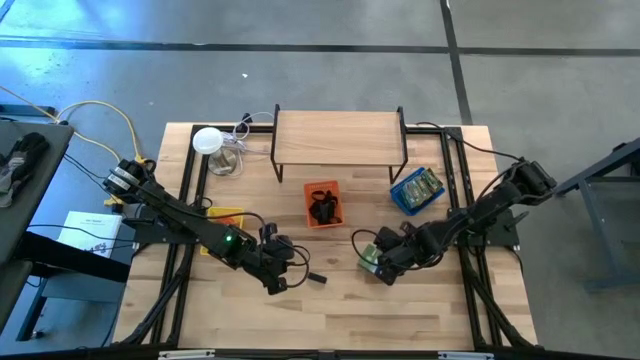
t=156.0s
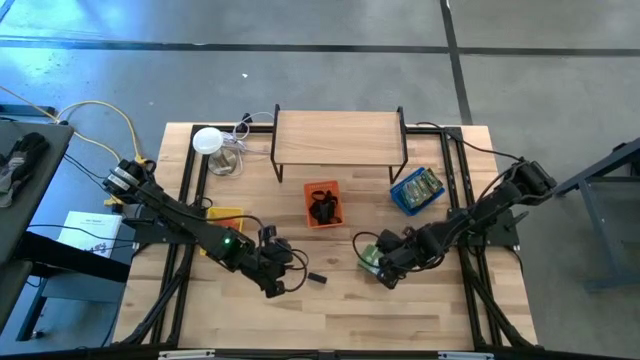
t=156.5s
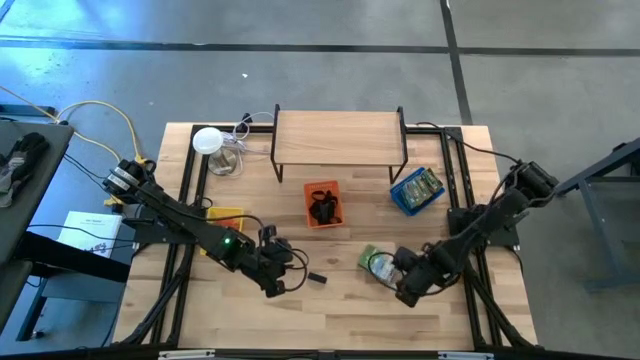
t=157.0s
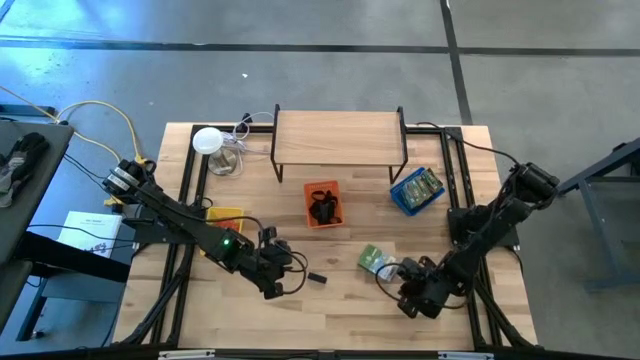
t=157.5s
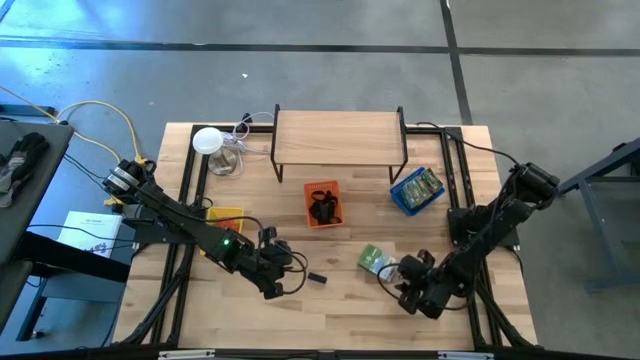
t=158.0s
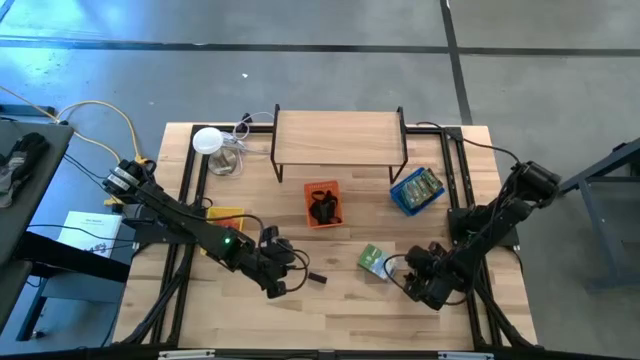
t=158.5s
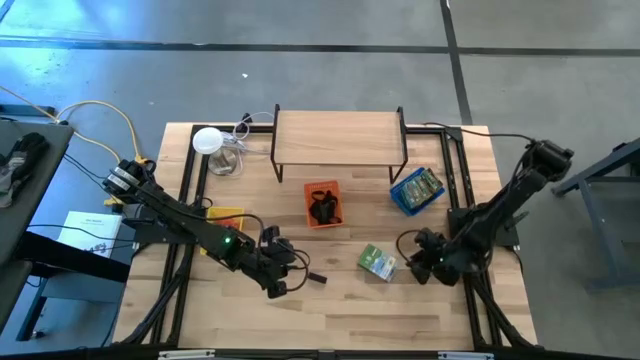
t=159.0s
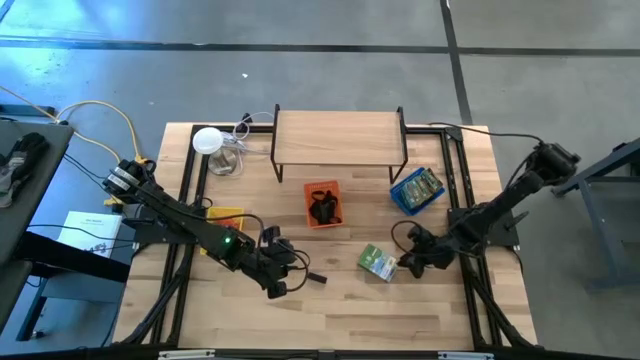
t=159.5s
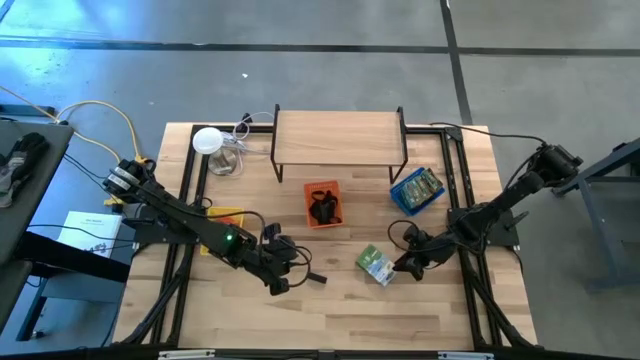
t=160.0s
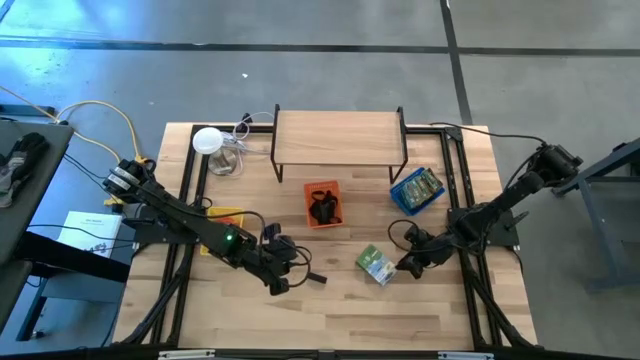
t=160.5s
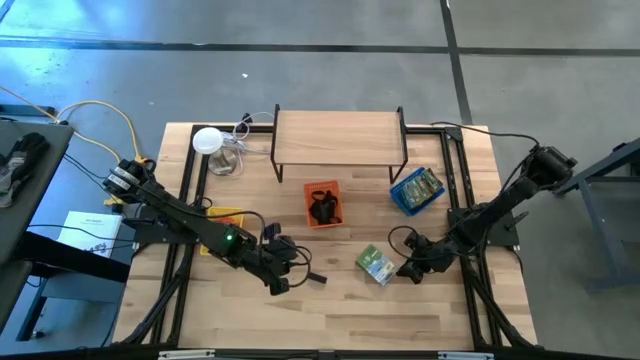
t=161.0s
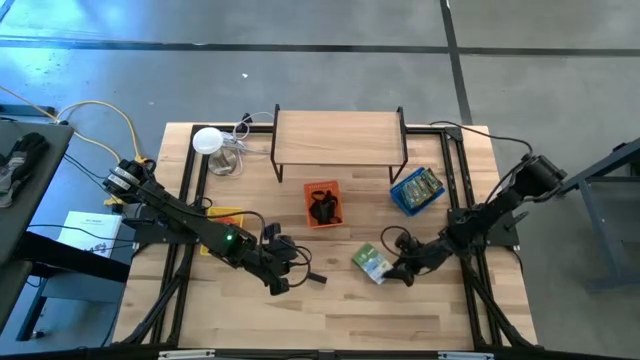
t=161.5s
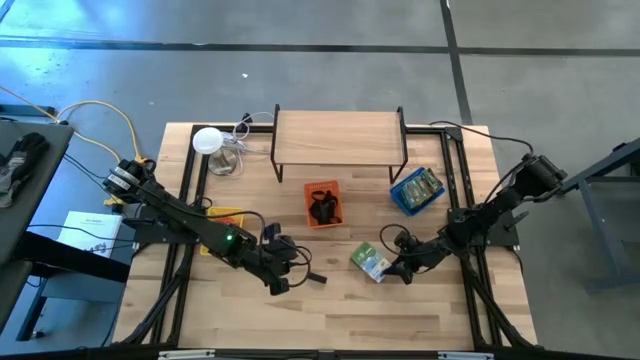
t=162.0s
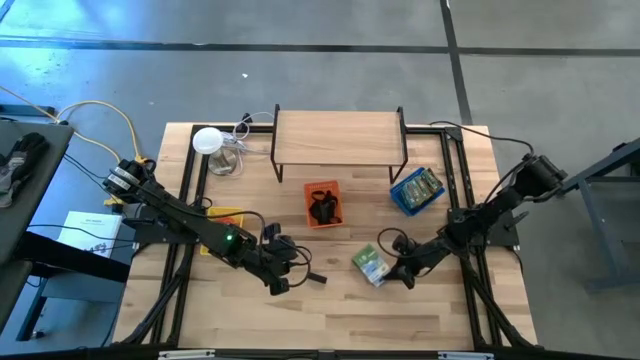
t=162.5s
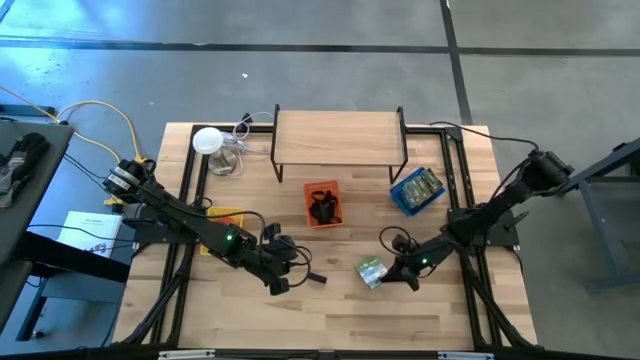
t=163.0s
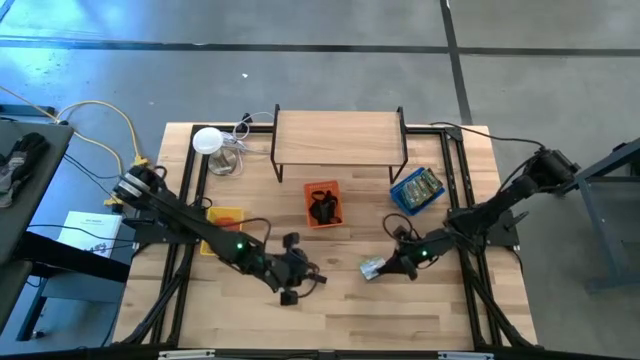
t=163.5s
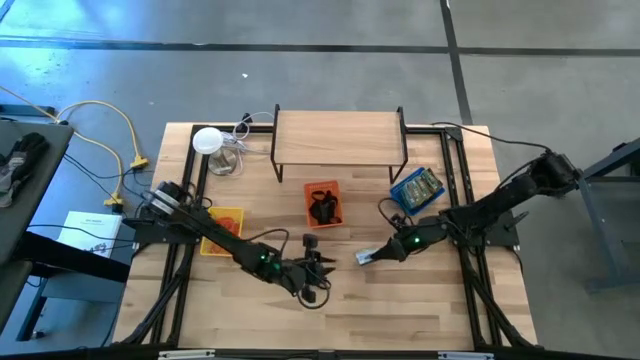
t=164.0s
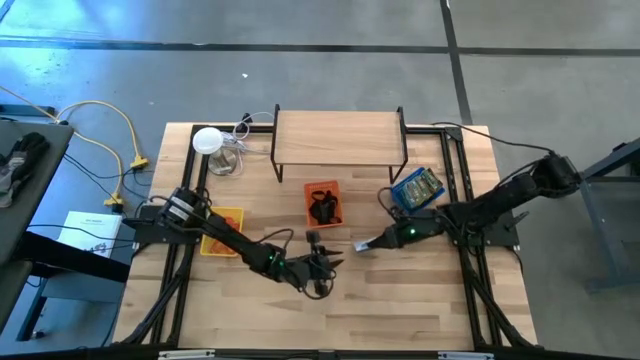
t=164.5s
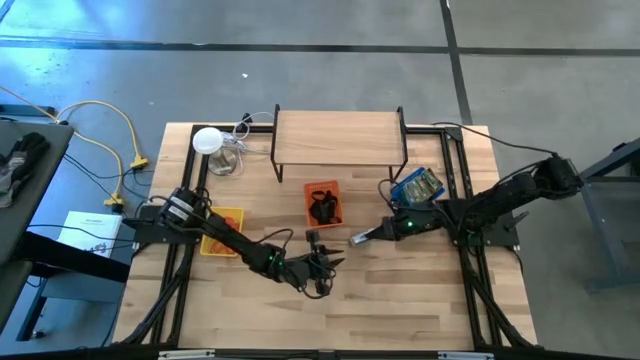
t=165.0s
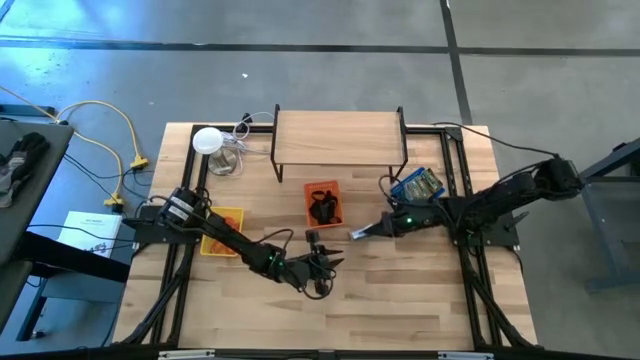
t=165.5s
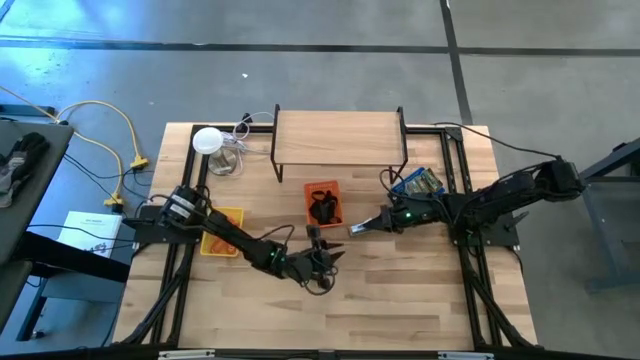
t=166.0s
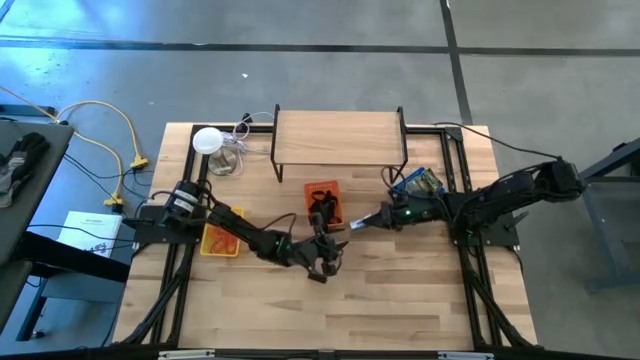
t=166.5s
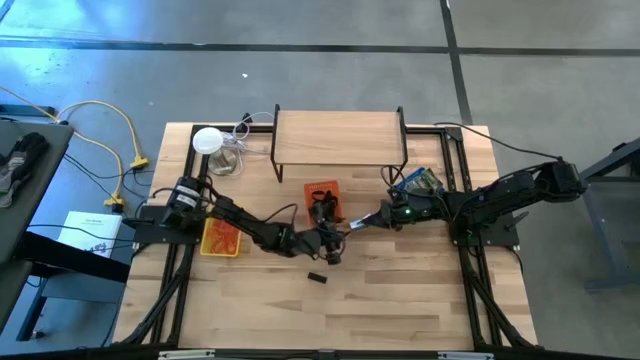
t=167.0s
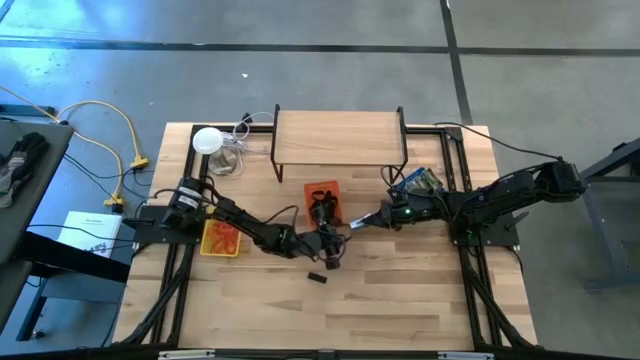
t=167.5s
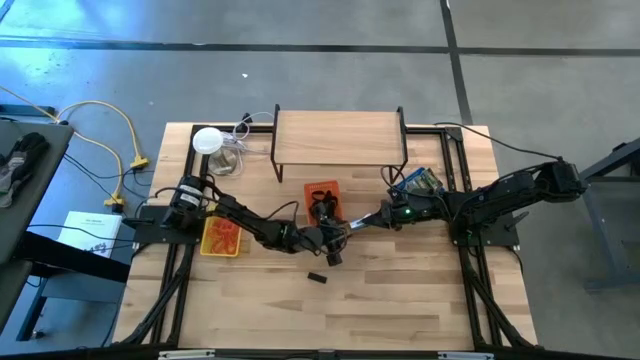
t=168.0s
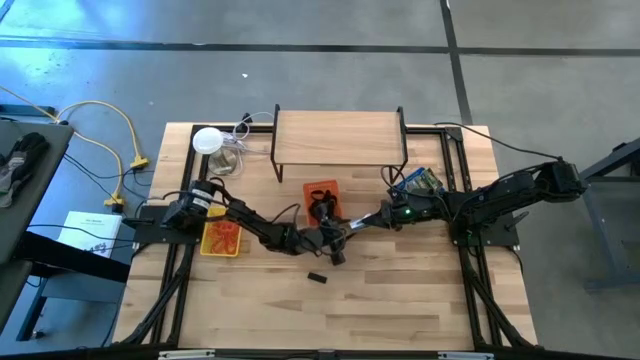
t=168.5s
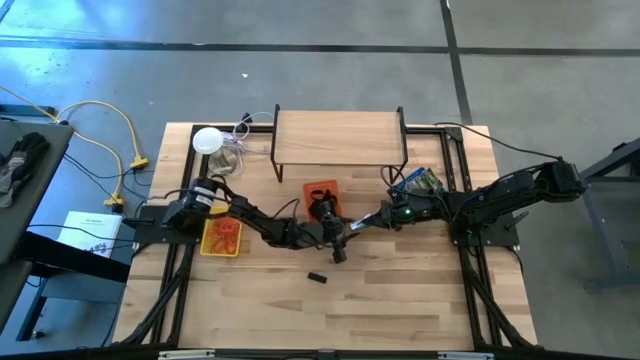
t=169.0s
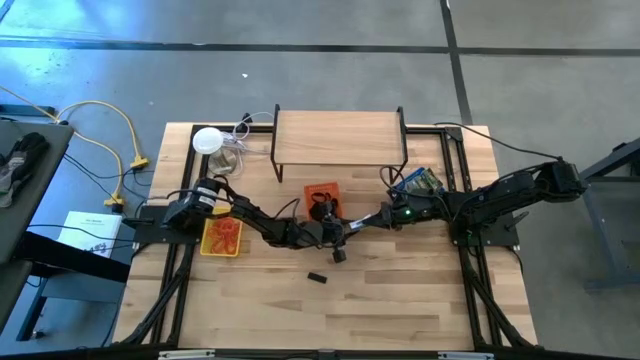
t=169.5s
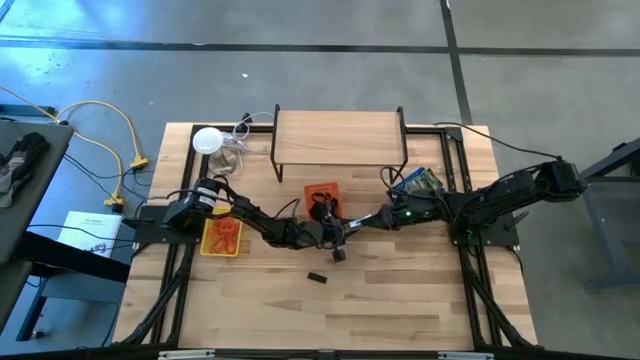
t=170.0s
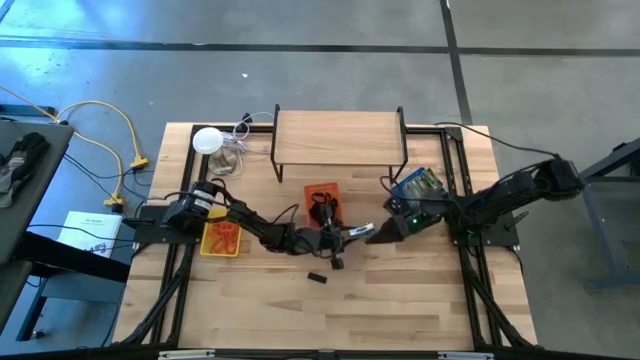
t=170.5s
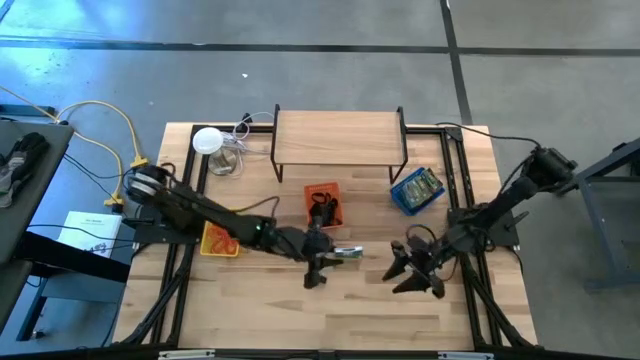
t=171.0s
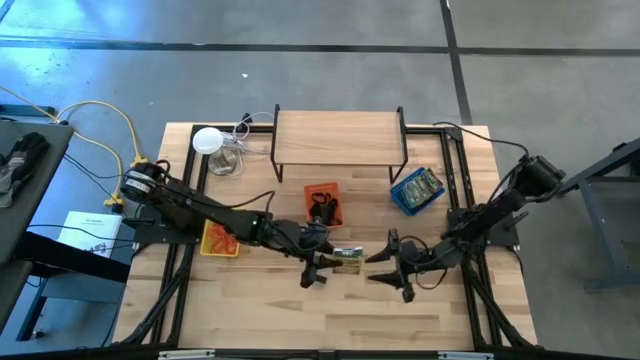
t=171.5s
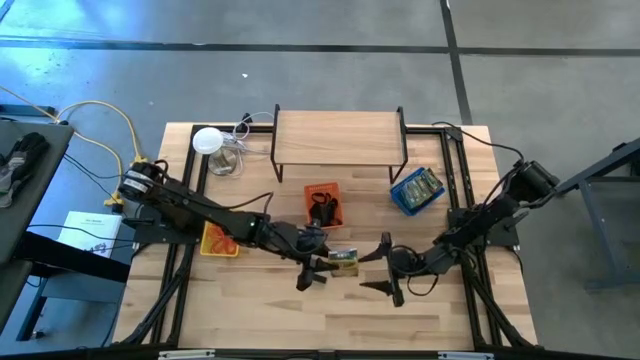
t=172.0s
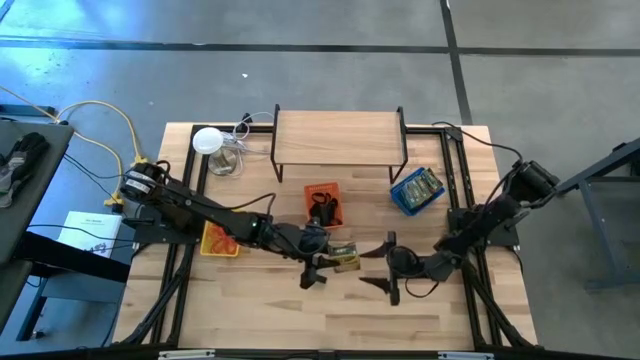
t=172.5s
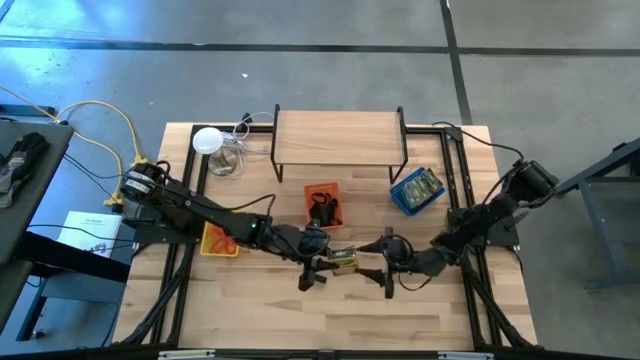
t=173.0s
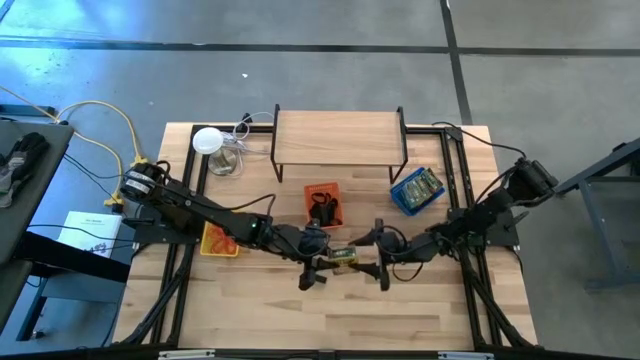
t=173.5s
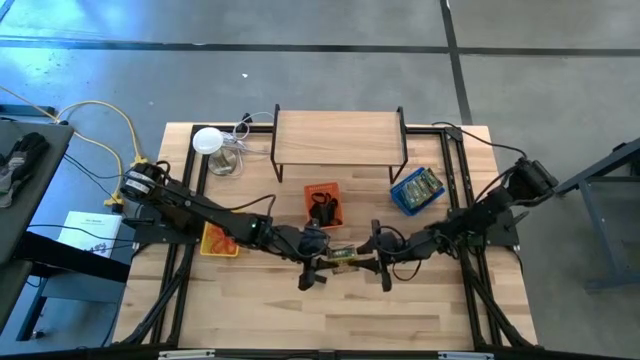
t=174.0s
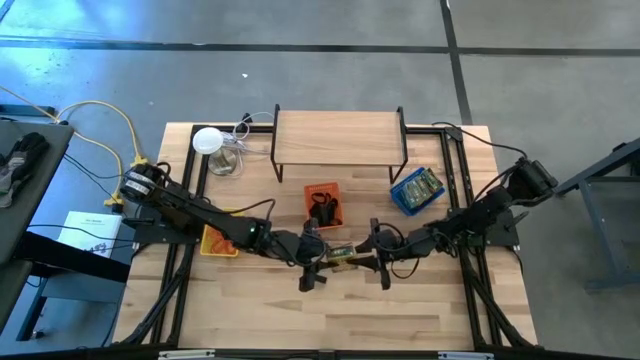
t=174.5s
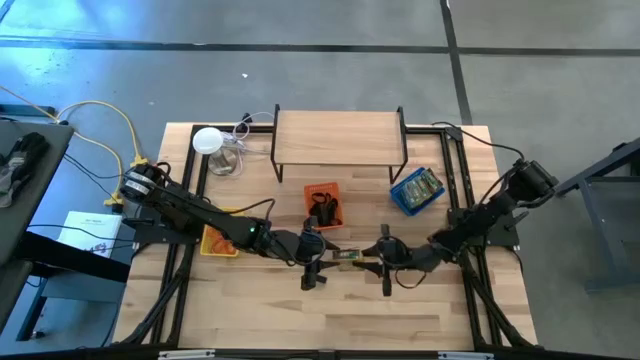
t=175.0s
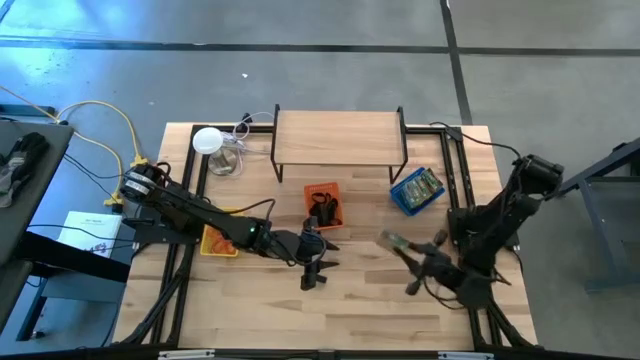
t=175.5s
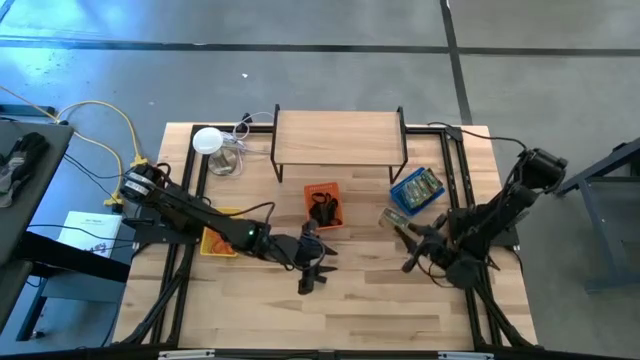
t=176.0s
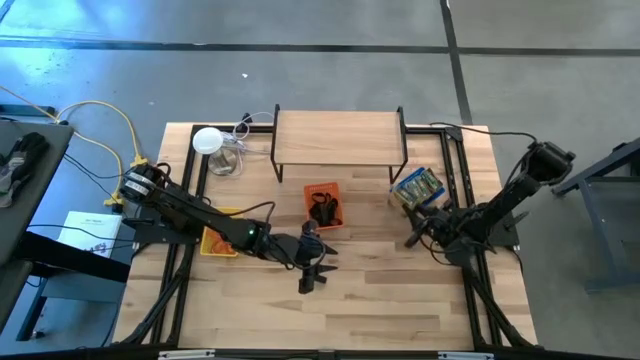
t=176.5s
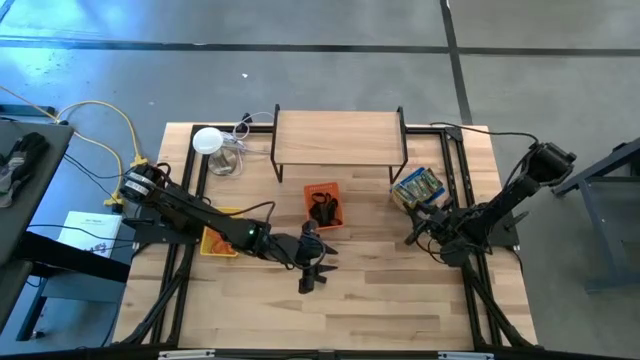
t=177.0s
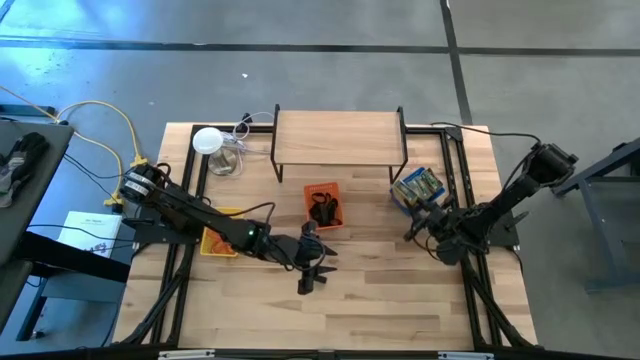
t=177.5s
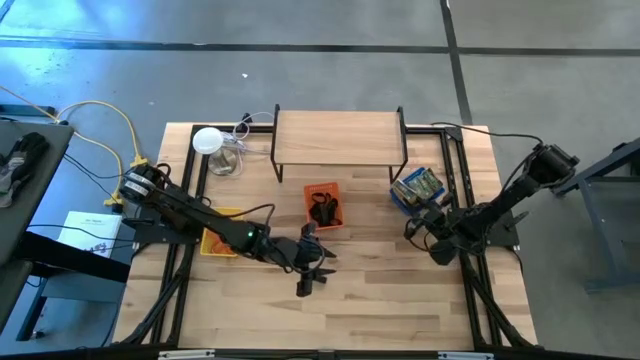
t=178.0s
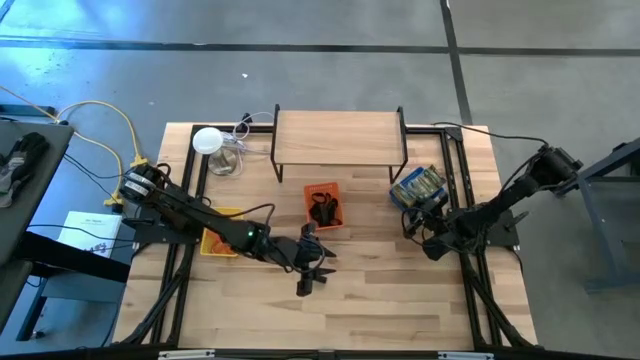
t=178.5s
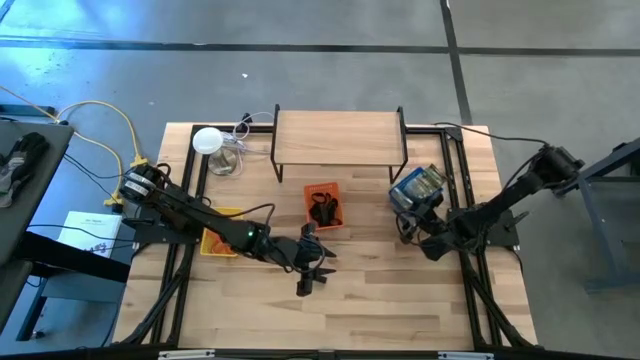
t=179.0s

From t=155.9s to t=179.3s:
Task: Pick & Place Office Desk Supplies
Put the yellow crayon box into the blue bin
